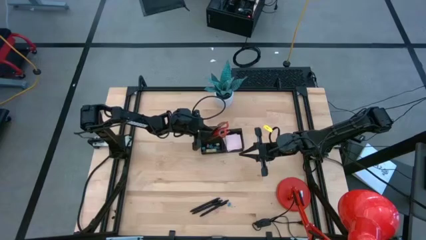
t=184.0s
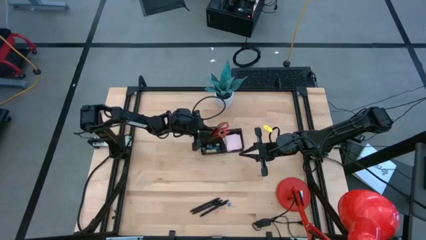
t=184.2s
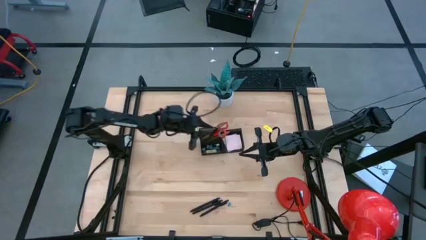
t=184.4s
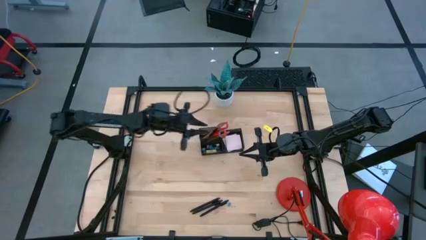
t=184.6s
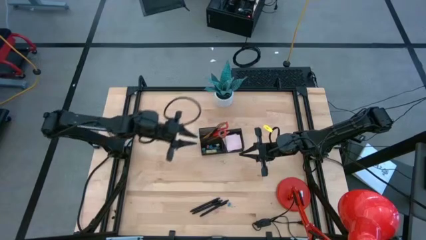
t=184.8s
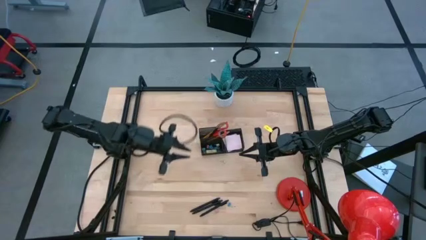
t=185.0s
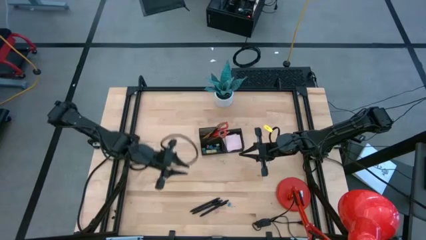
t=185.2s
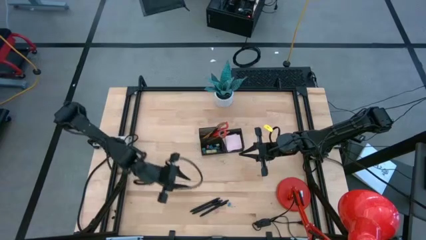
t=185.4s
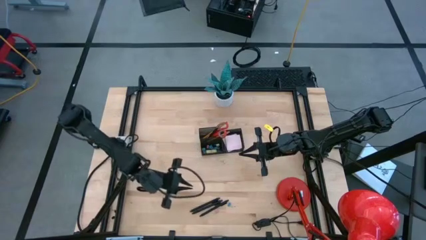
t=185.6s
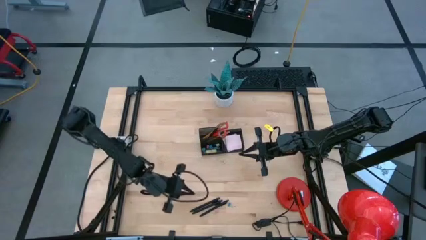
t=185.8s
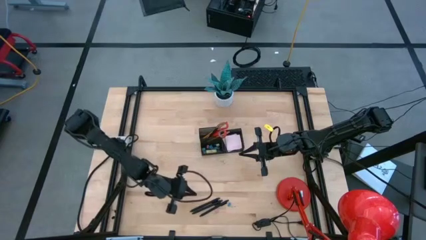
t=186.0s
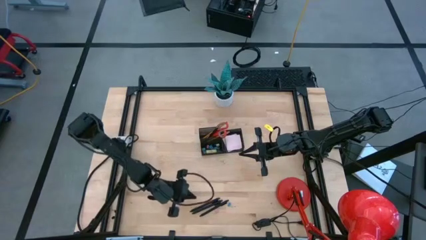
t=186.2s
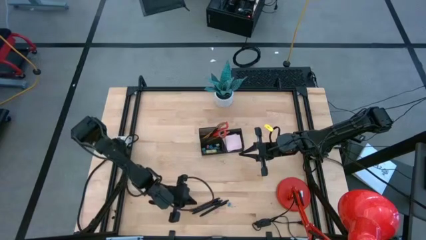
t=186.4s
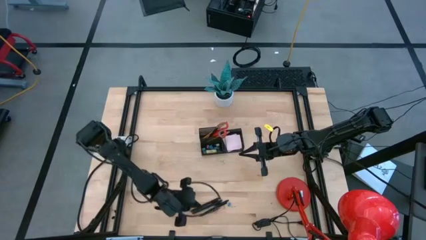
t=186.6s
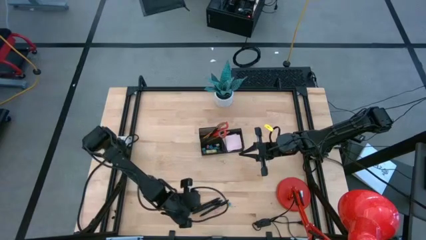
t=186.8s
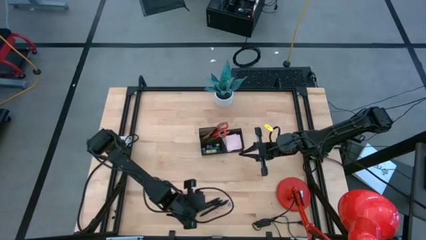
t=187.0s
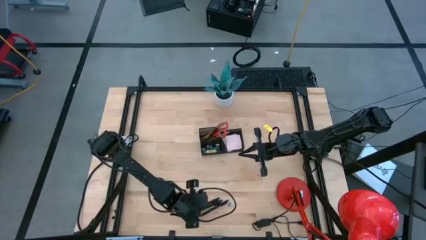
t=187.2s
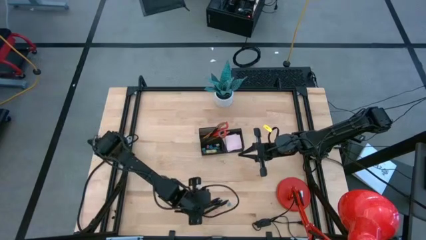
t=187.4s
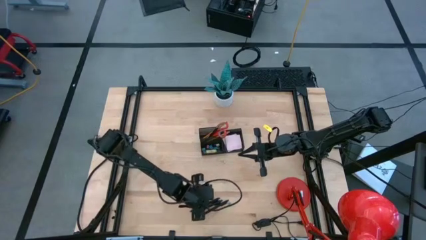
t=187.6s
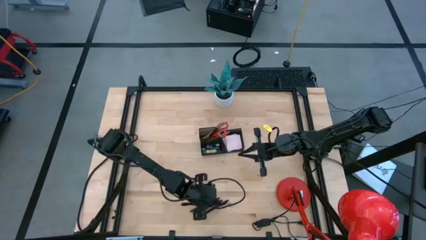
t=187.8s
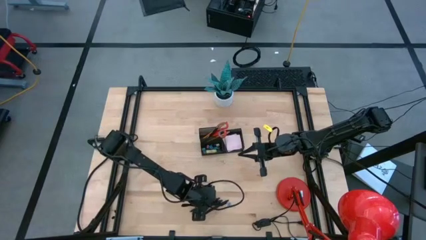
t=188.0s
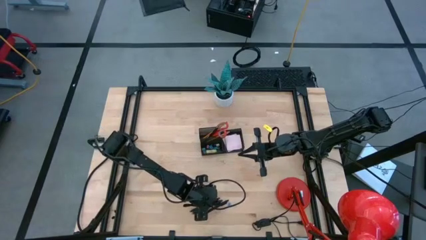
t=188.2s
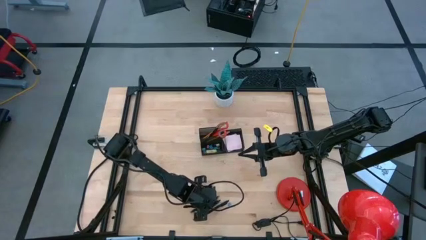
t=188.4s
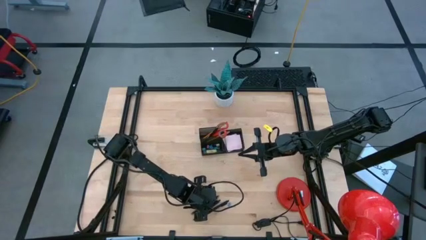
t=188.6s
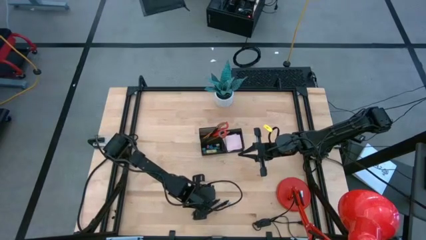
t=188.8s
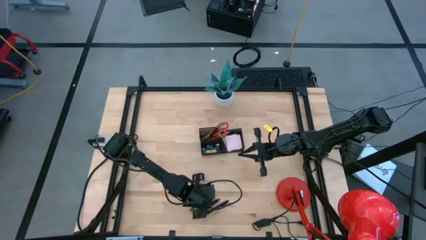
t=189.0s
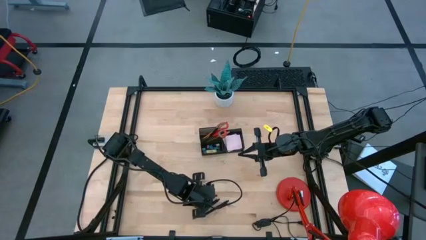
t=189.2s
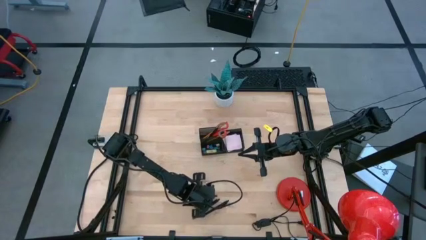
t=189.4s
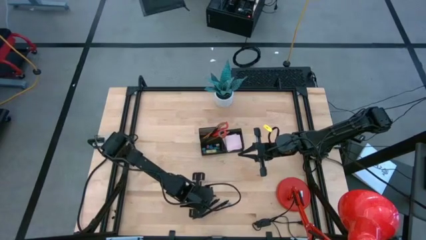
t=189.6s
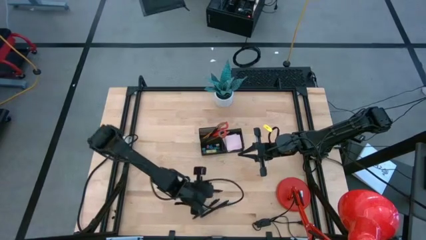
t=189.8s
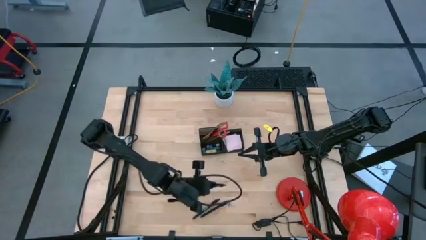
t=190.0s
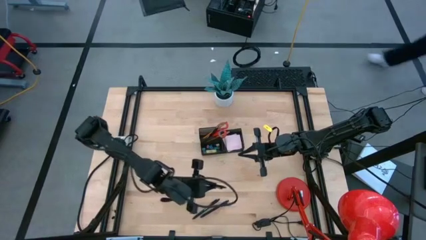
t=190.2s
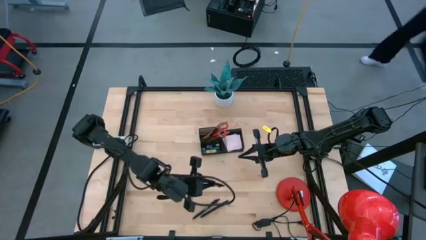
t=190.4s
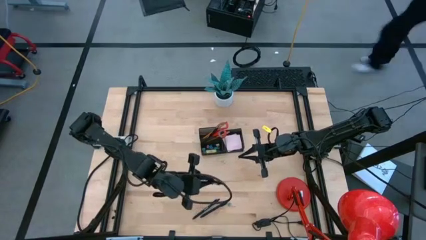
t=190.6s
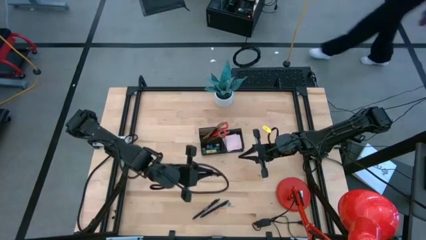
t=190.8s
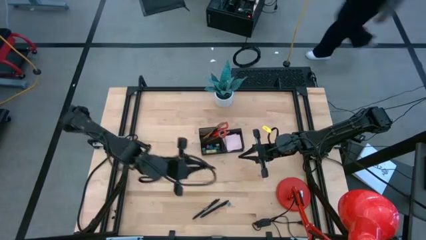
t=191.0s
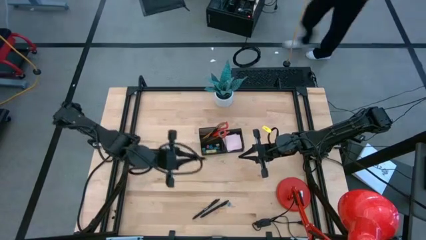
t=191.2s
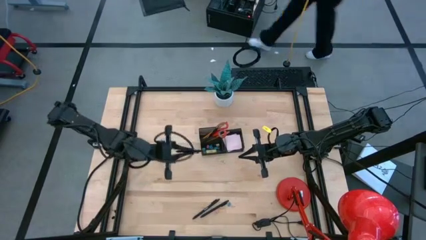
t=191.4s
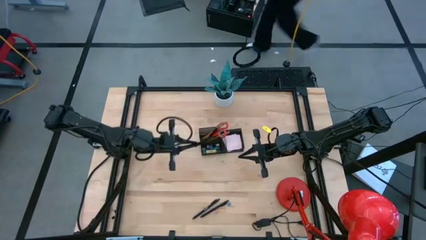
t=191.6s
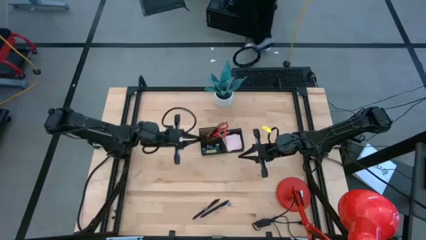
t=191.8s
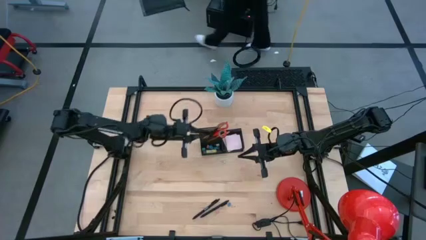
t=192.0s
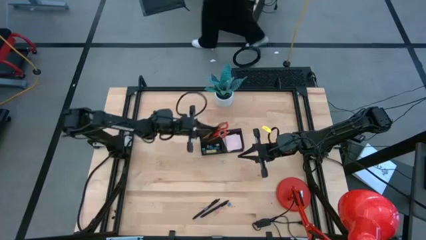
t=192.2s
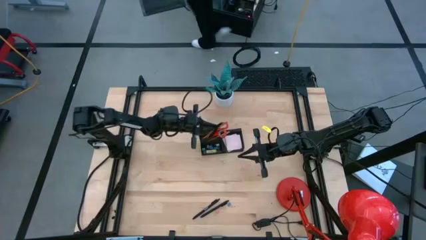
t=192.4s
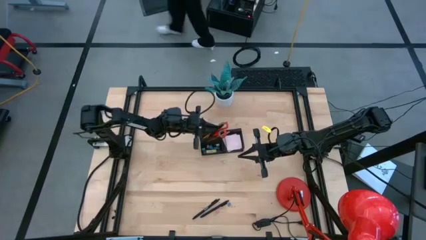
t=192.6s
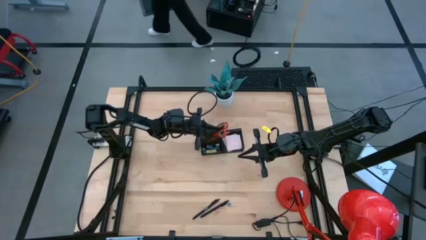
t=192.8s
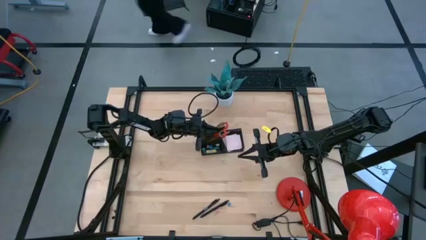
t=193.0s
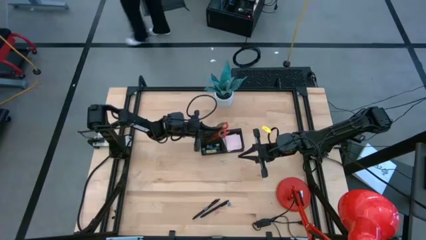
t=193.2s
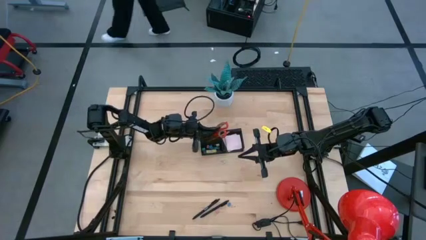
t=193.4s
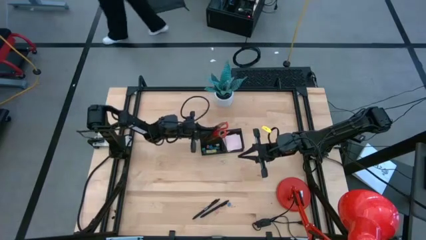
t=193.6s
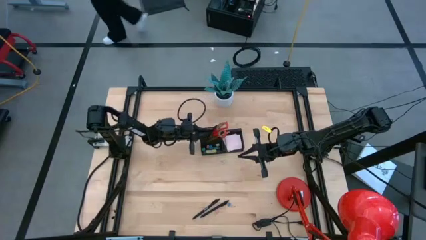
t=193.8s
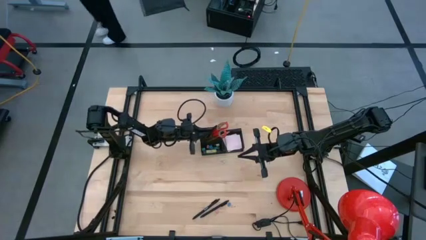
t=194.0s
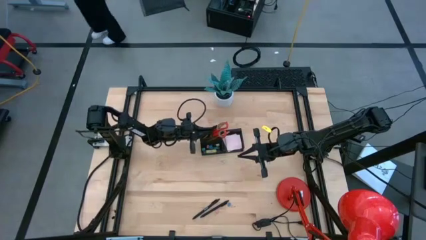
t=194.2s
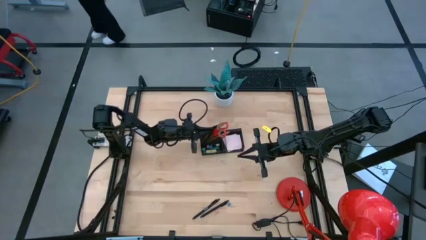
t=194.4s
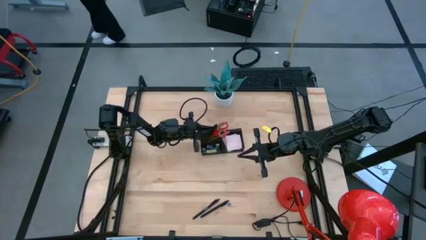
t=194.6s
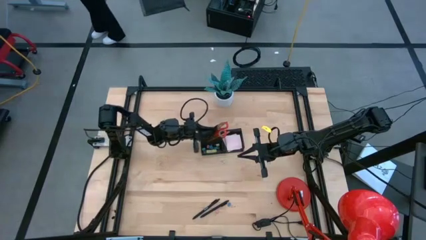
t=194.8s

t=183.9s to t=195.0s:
Task: Pick and place office supplies into organizer
Put the black pen into the black desk organizer

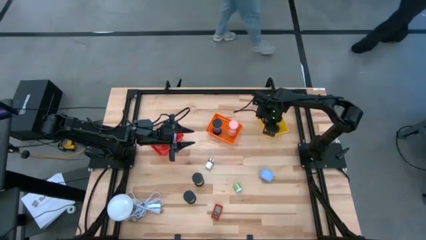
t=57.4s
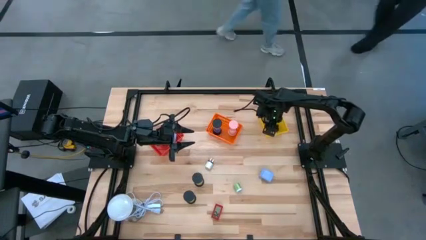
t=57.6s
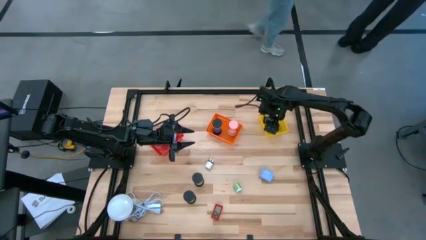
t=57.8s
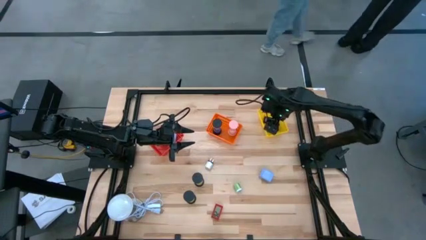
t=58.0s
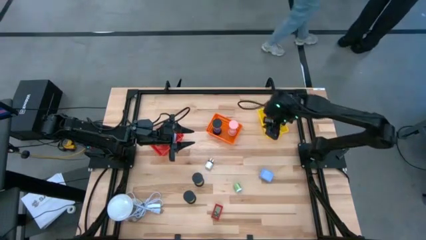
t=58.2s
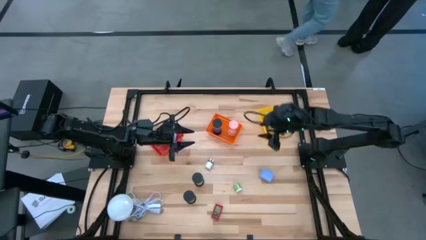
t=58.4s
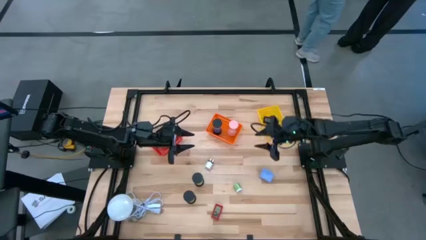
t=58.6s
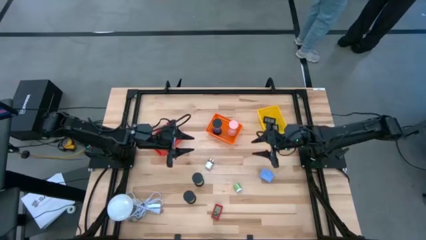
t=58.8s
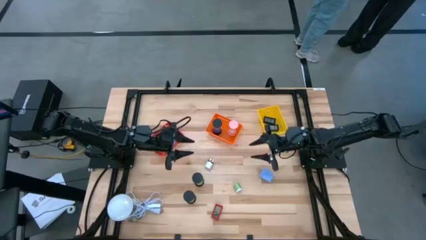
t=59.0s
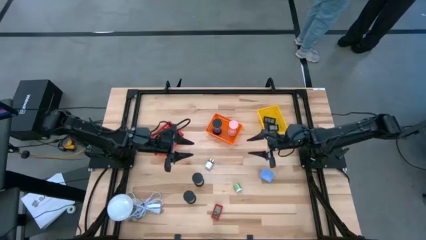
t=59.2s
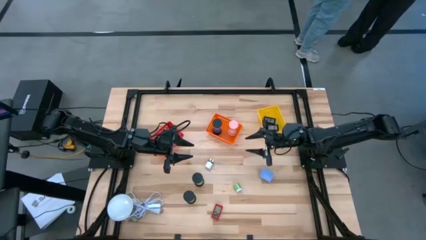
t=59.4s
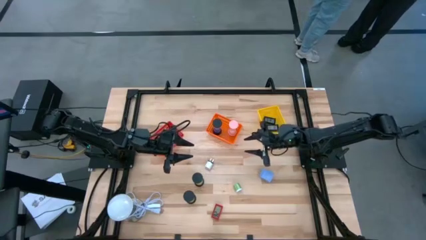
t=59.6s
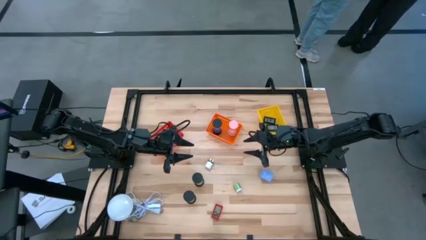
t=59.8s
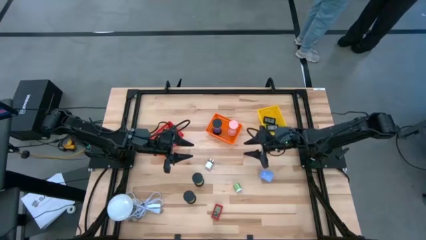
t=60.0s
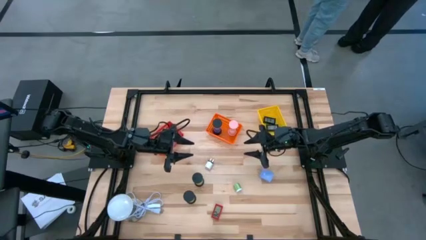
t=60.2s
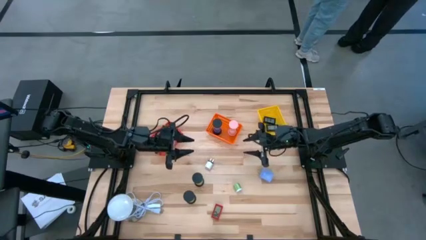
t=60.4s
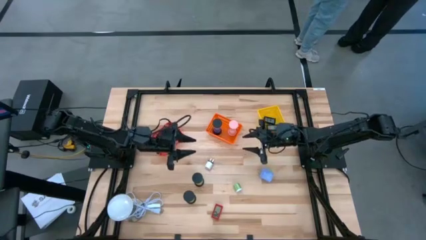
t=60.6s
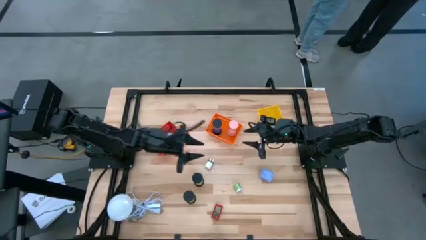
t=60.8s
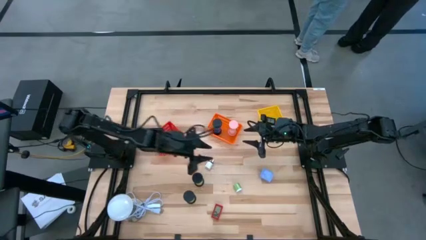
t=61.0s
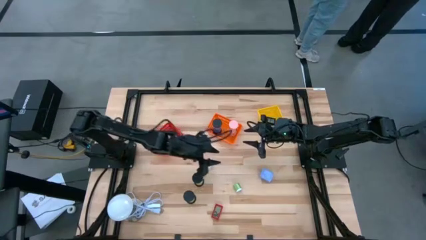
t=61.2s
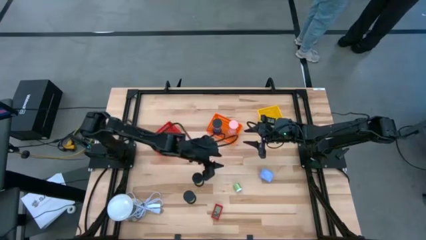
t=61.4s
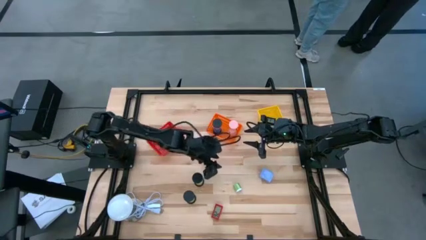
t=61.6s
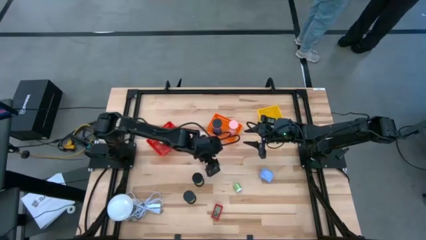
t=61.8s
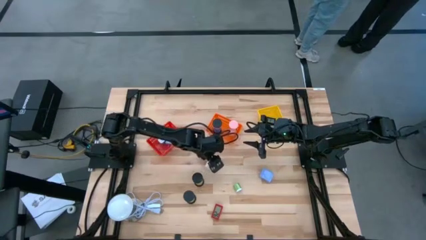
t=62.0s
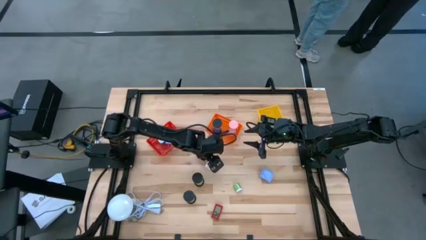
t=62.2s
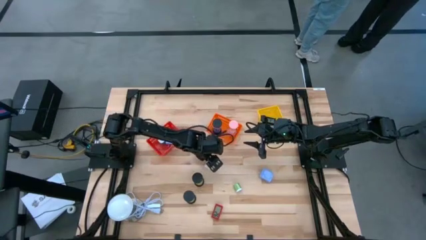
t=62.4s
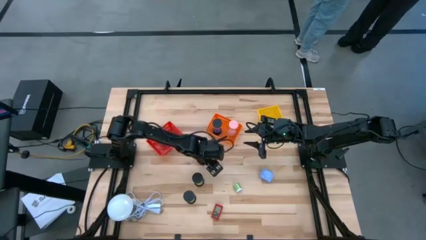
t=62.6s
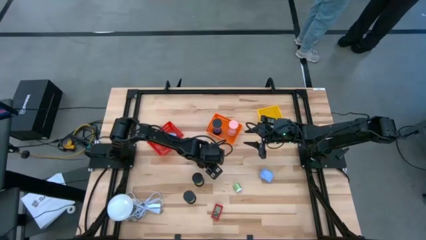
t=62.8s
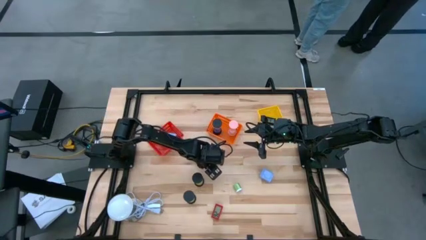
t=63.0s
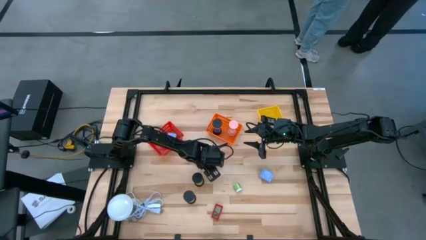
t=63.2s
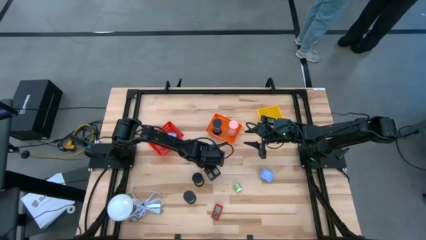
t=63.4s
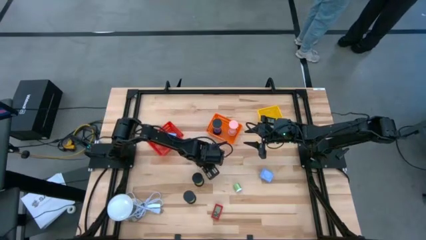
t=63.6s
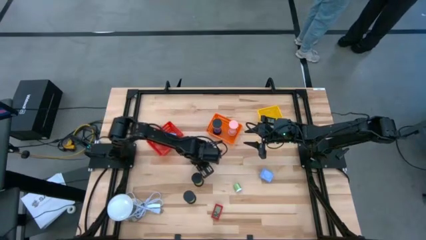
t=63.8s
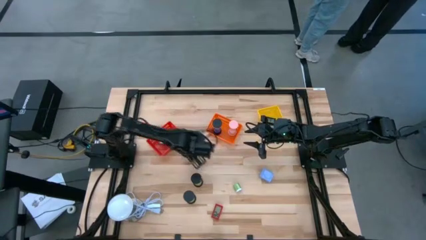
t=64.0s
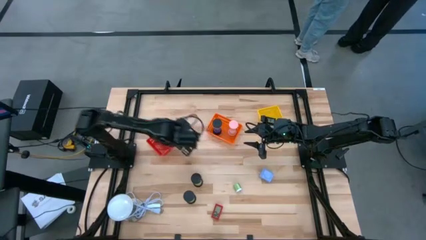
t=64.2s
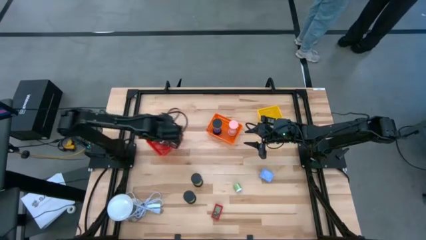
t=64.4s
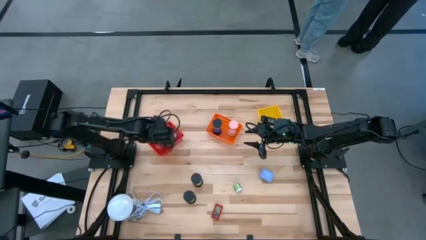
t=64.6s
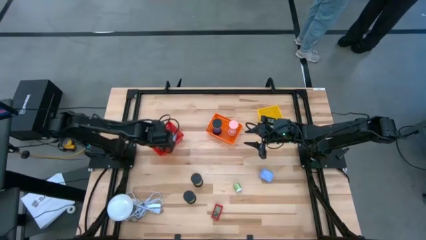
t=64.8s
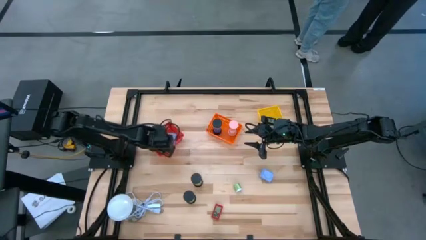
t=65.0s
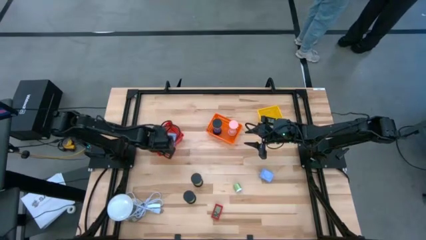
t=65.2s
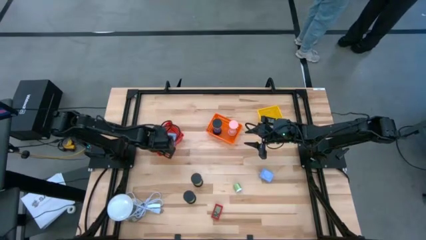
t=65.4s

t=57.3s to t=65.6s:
Task: Pick & Place Office items
Put the white charger adapter into the red basket
